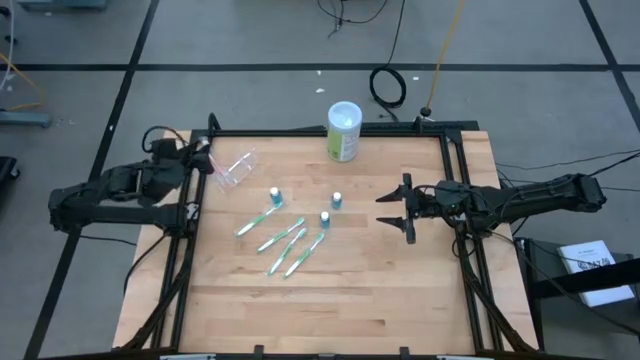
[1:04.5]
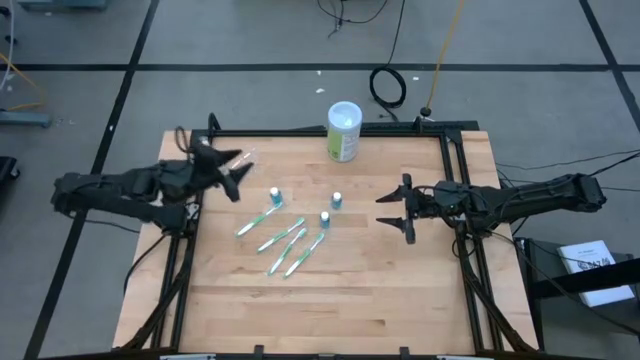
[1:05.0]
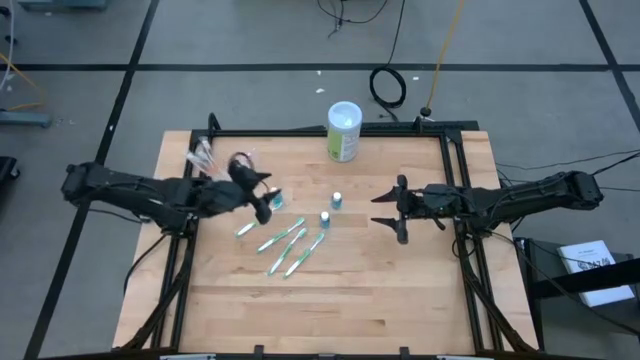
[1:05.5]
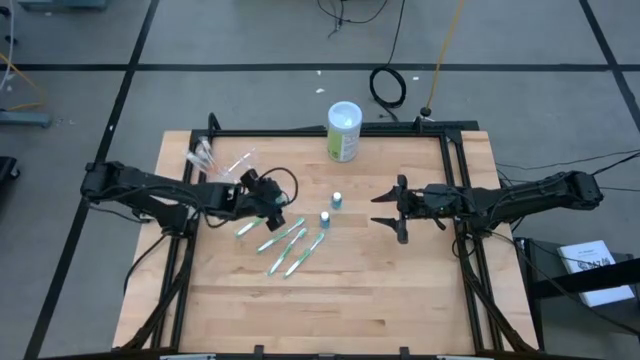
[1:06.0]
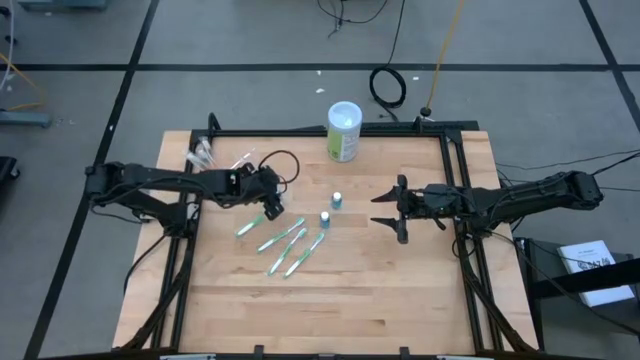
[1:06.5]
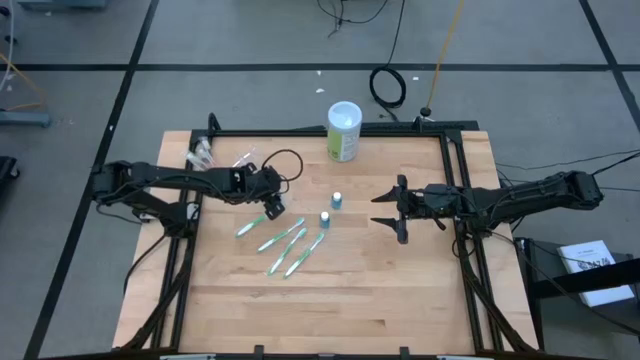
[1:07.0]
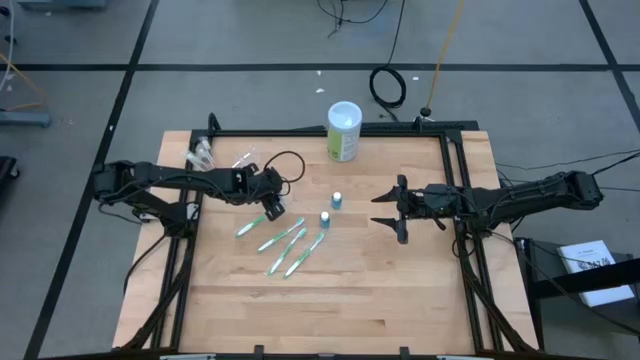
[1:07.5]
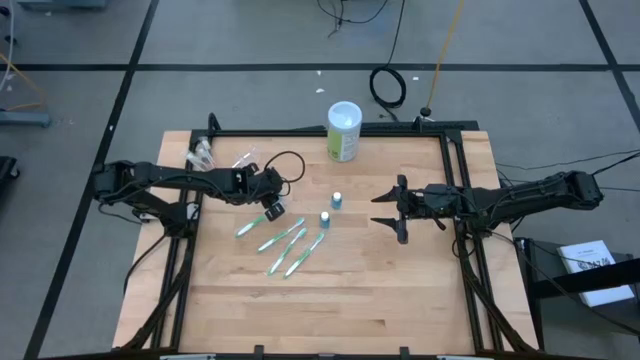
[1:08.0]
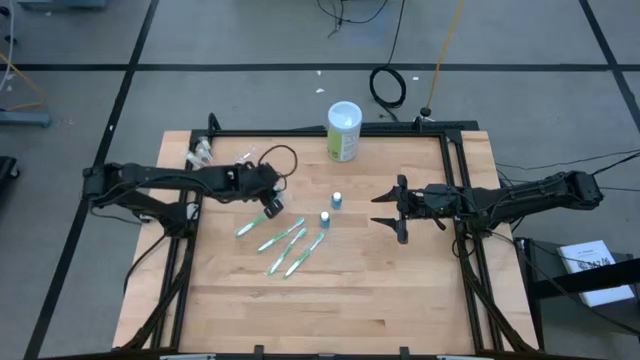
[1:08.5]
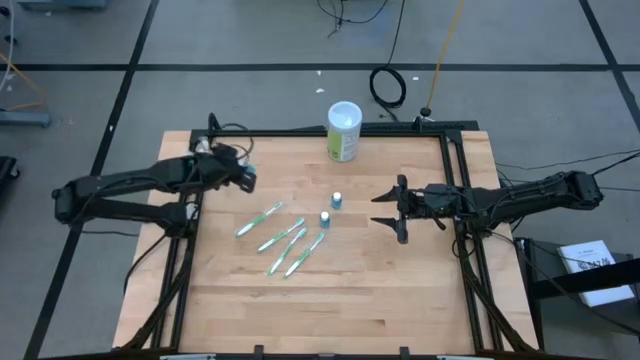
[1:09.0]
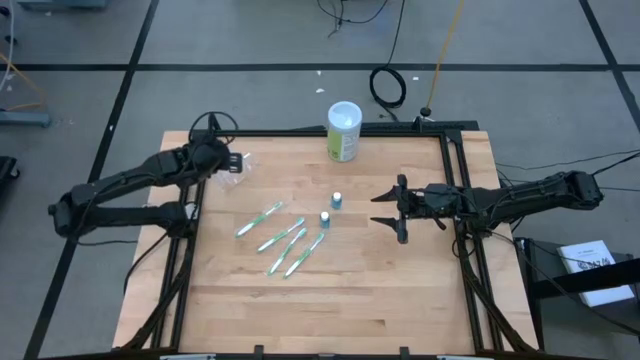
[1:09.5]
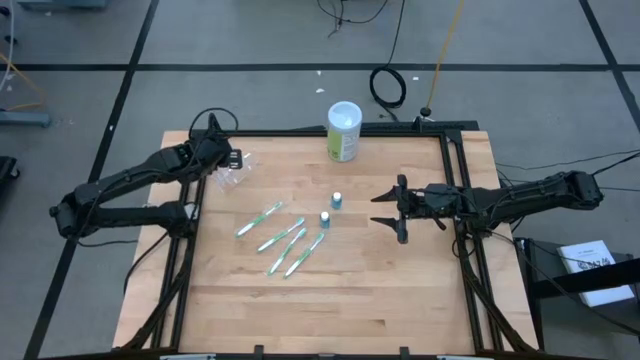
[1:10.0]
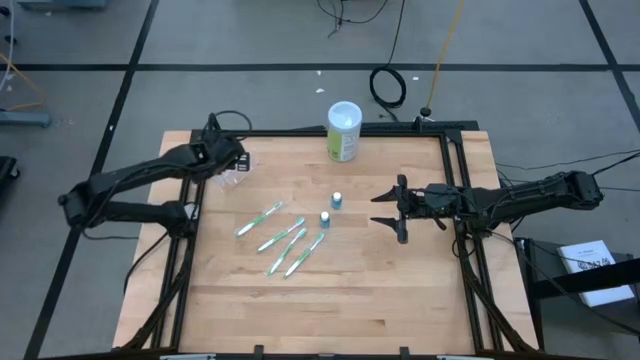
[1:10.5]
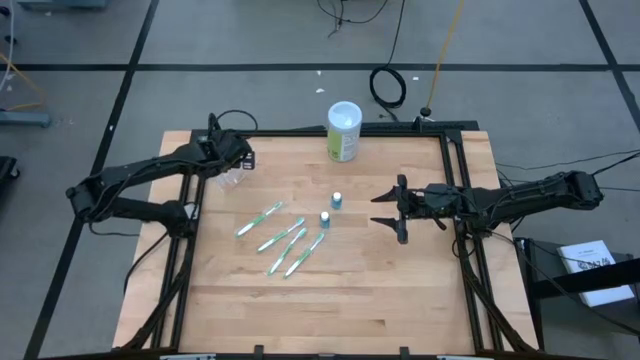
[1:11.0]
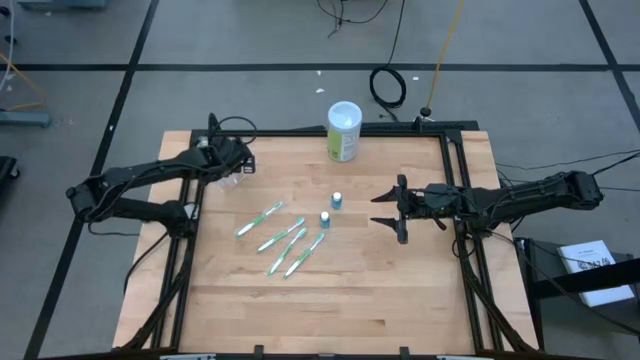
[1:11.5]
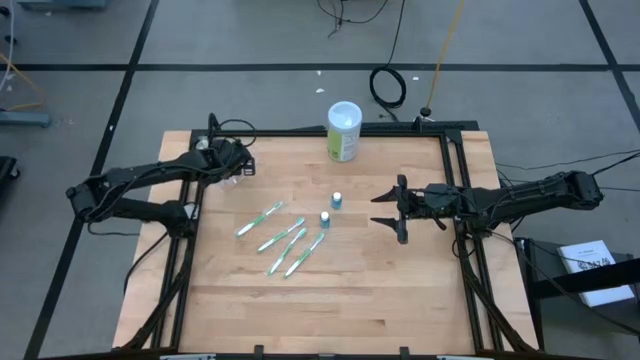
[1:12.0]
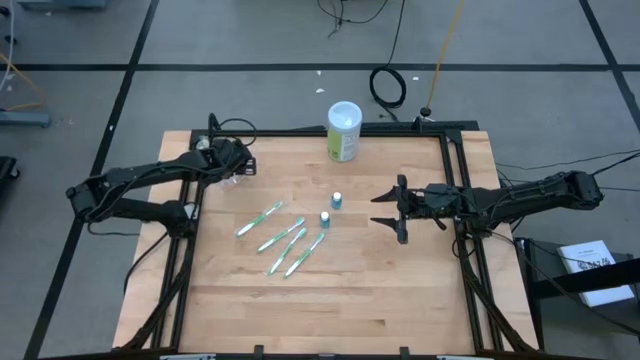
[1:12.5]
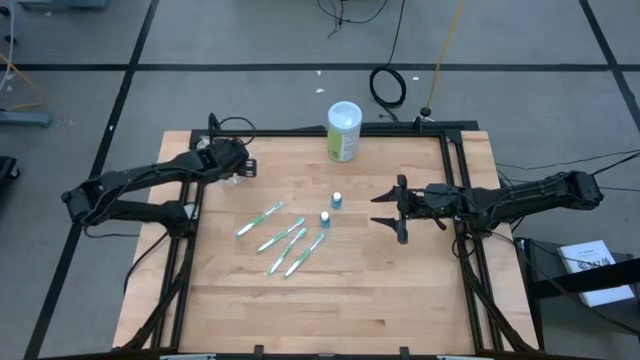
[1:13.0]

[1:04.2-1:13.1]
Task: Pick & Place toothbrushing station
Put the blue mouthwash into the middle section of the transparent organizer

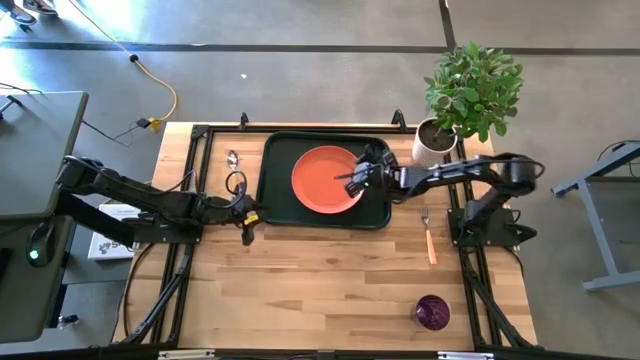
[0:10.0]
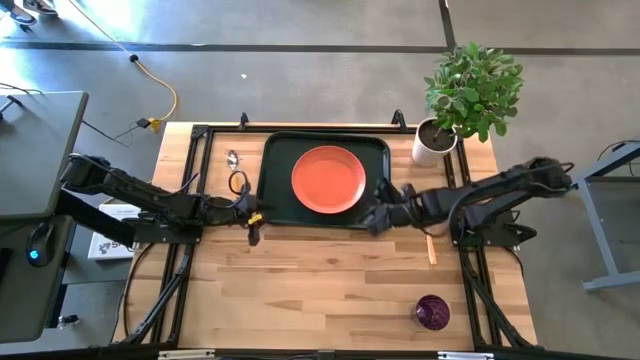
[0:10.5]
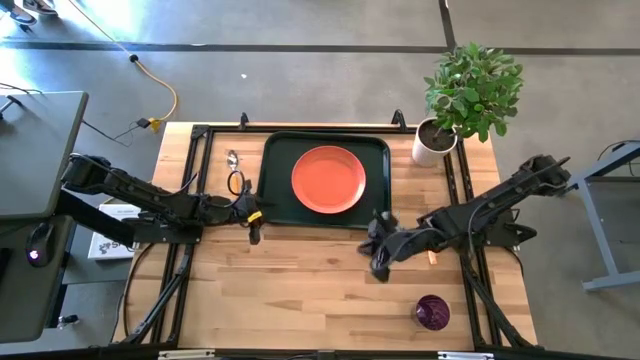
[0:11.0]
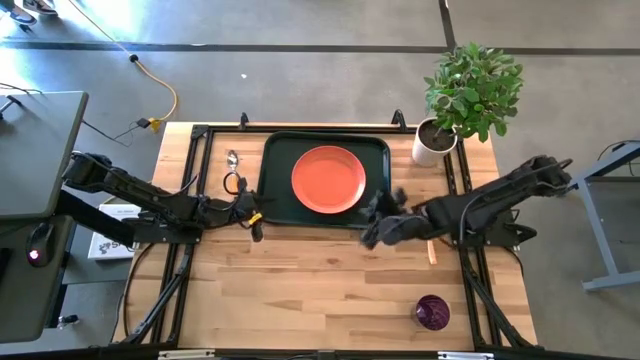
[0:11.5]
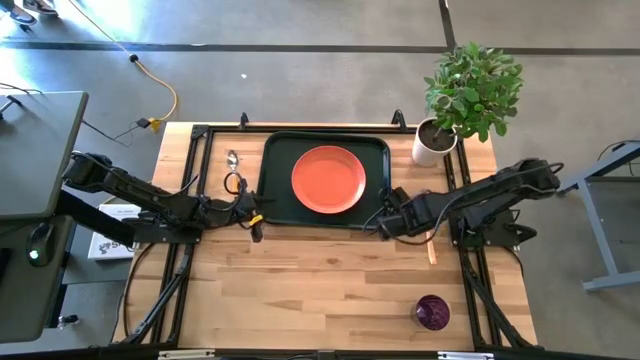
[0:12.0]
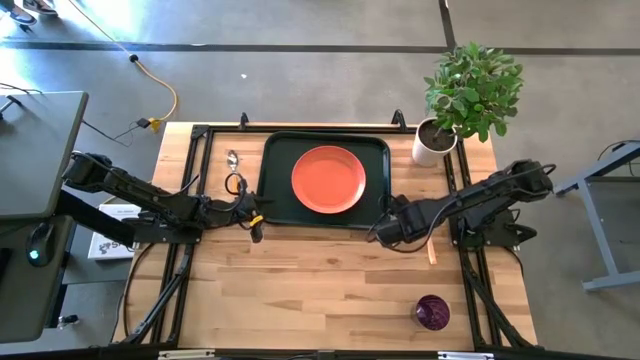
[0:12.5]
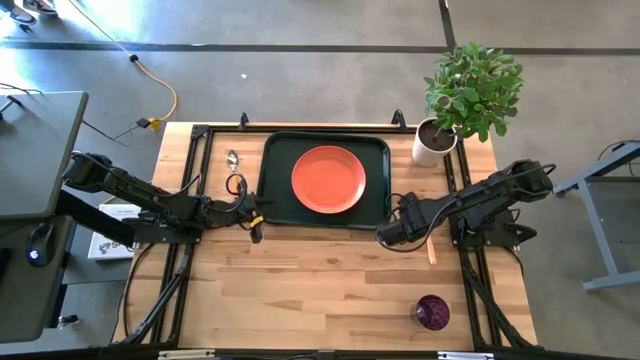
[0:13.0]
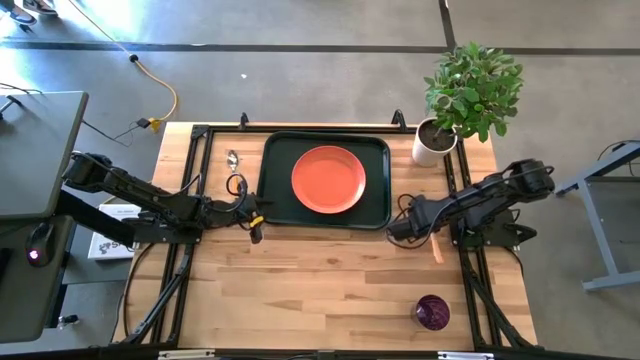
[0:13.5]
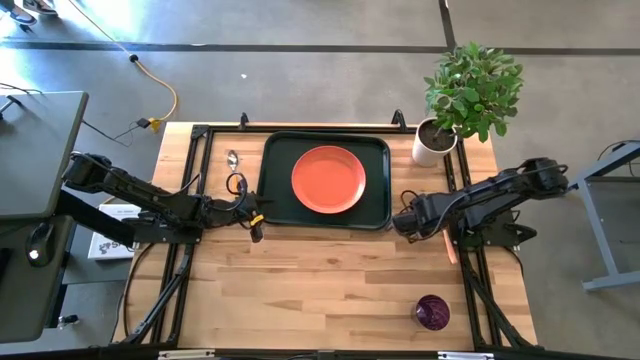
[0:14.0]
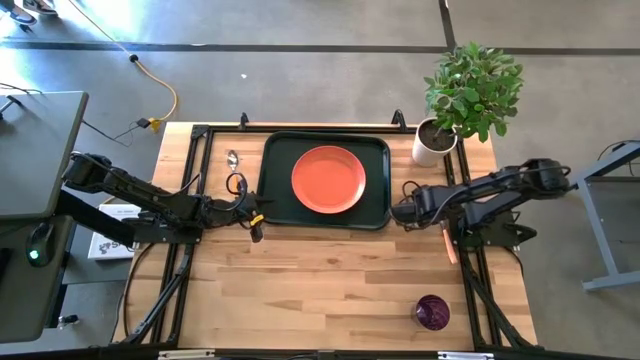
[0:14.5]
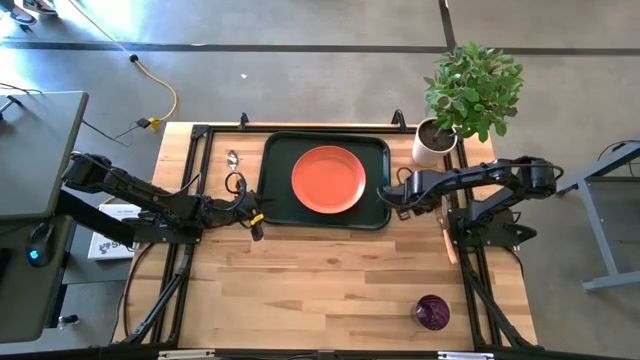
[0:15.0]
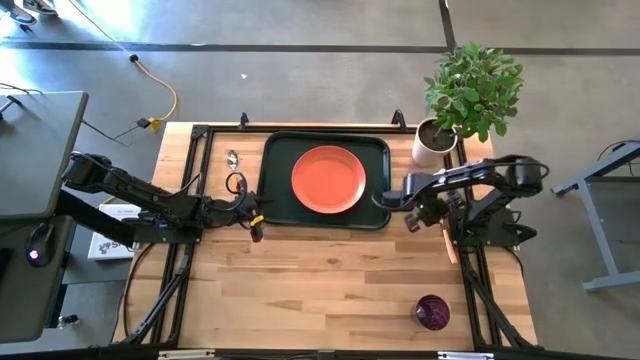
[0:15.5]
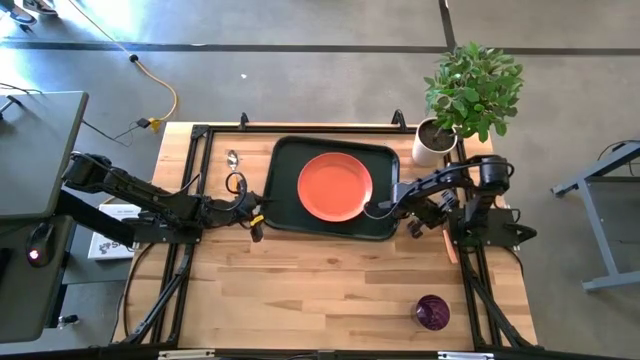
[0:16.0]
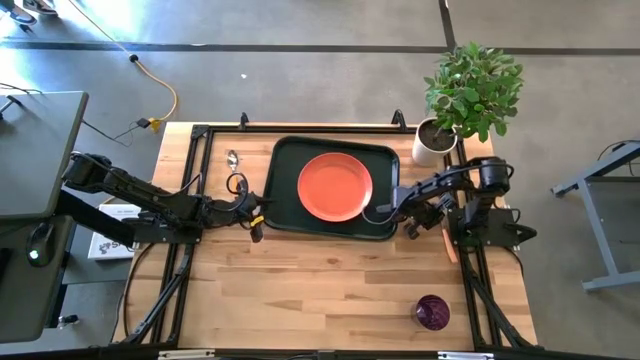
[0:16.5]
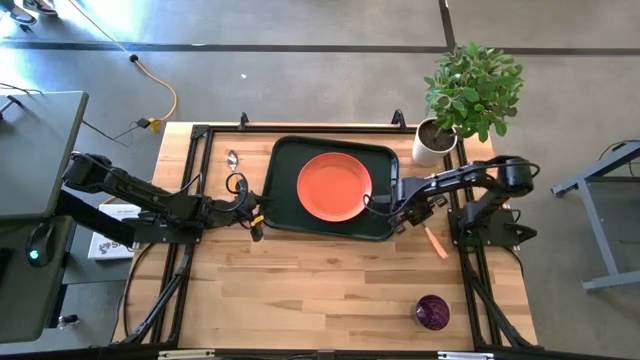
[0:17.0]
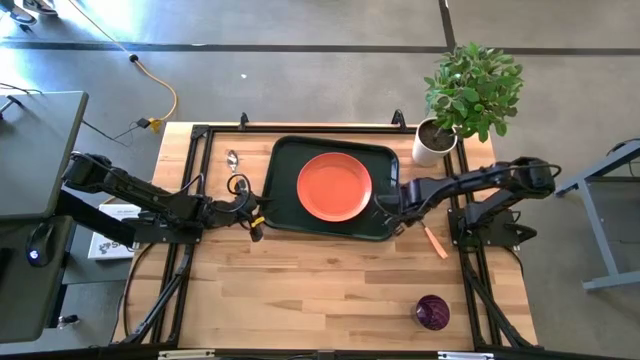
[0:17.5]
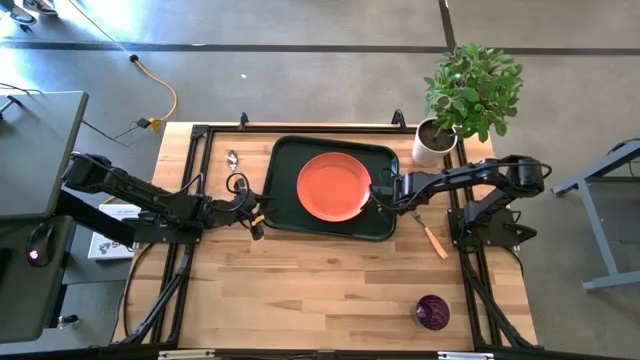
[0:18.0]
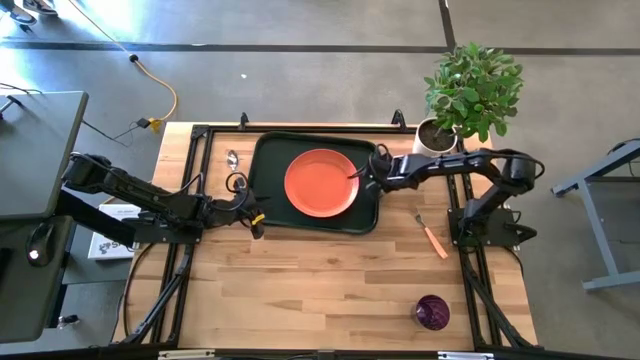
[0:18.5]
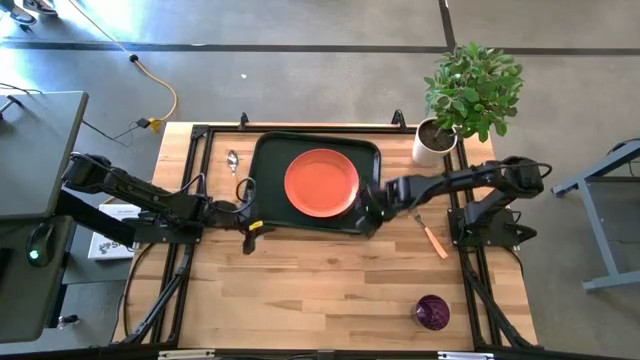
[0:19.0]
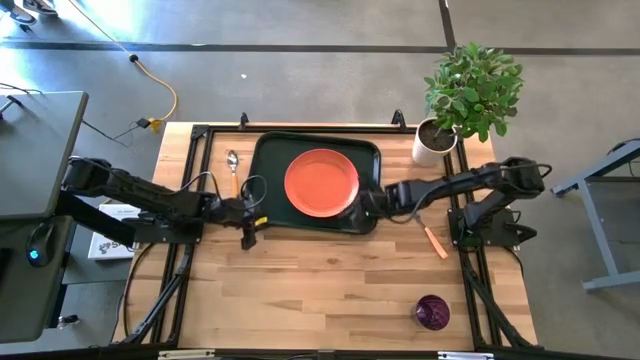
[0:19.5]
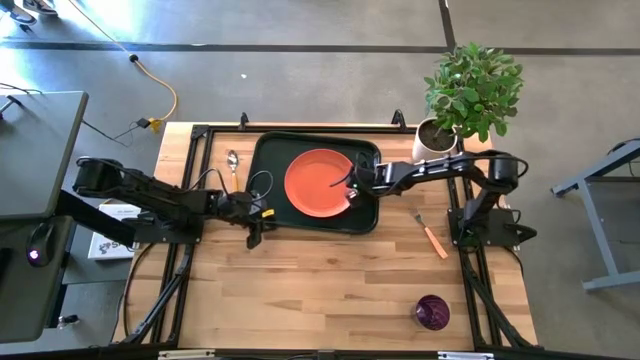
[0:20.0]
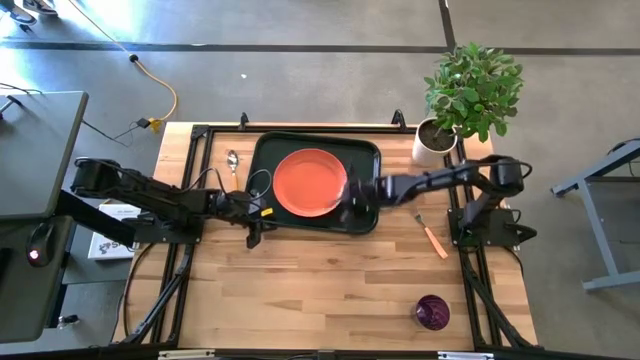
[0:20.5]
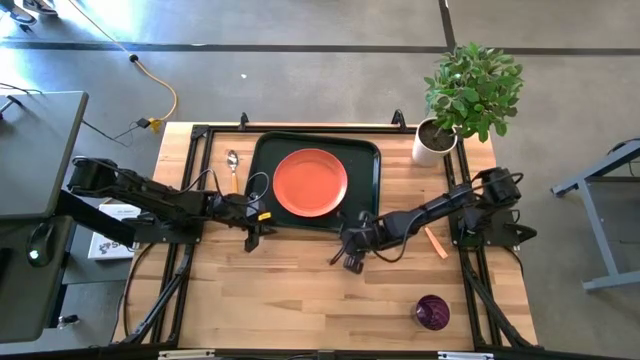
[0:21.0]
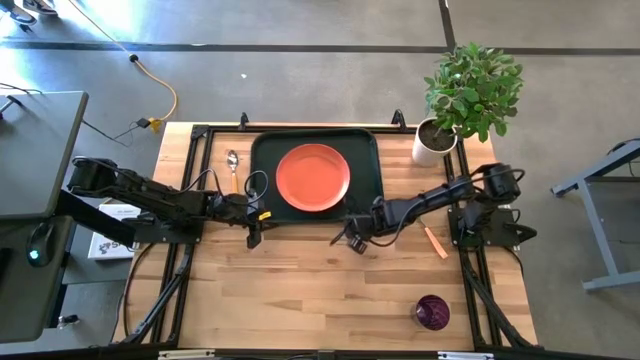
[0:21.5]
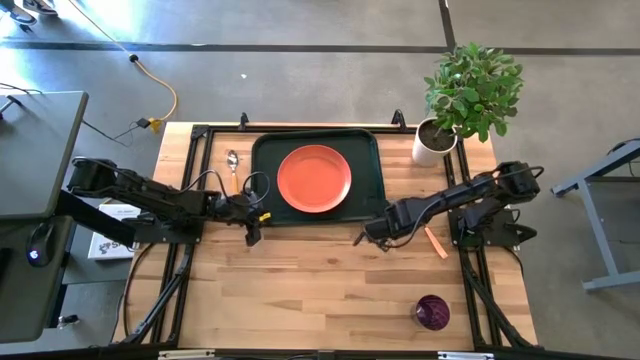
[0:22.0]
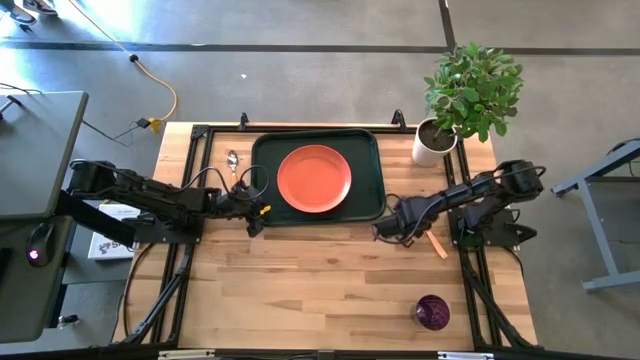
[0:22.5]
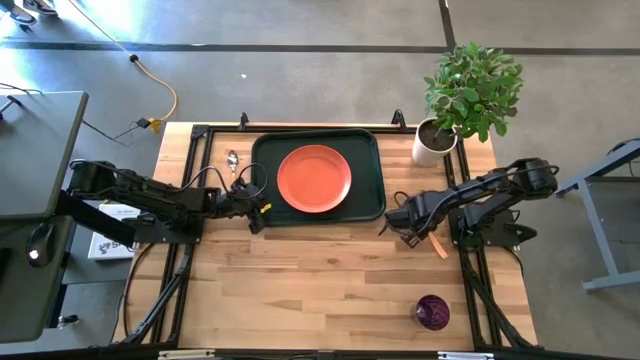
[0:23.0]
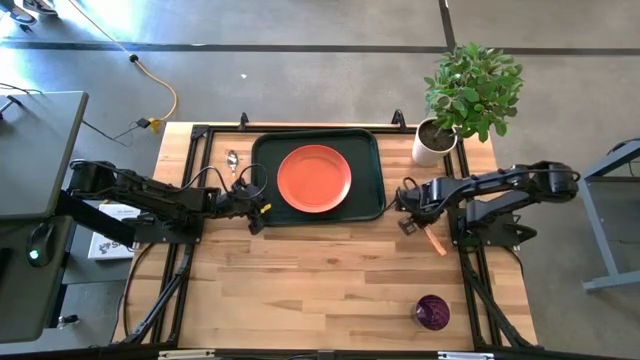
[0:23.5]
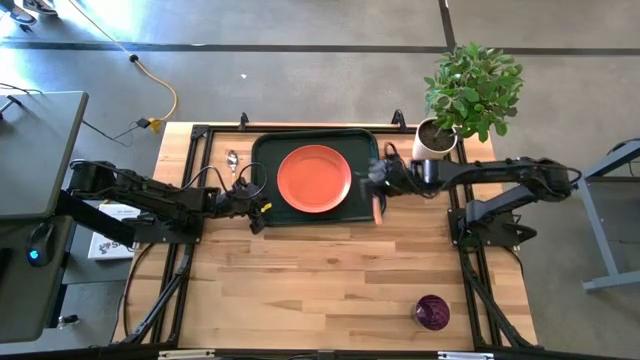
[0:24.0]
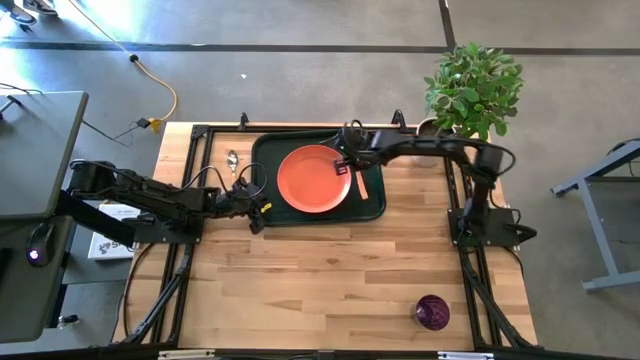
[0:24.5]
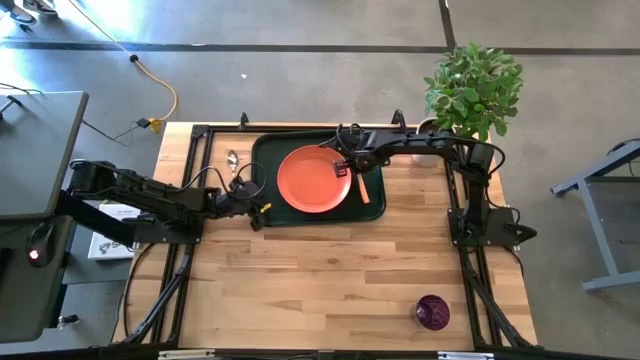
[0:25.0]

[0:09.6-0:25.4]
Task: Pick and place plate/cup/fork/spoon on tray
Put the orange fork on the black tray to the right of the orange plate
